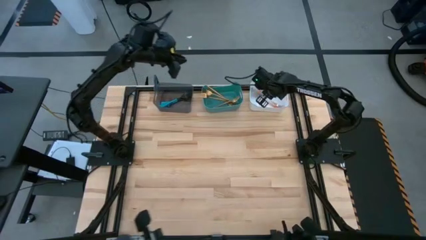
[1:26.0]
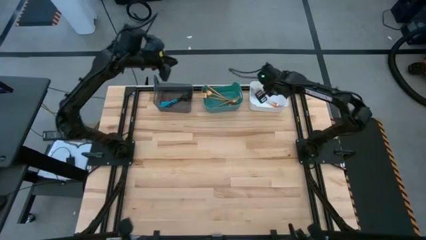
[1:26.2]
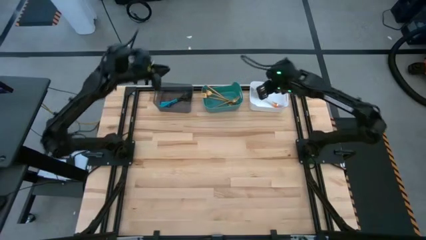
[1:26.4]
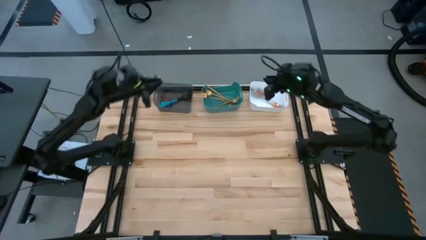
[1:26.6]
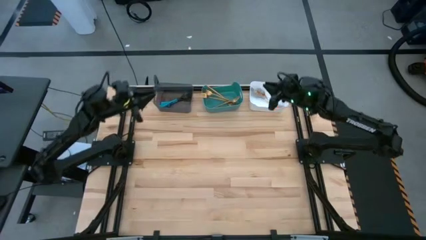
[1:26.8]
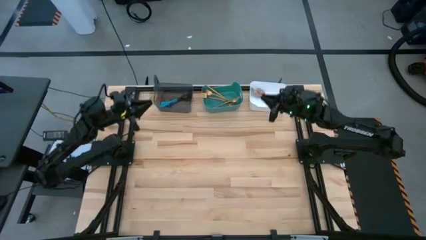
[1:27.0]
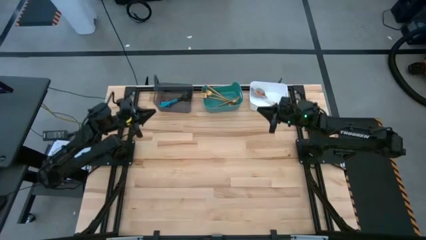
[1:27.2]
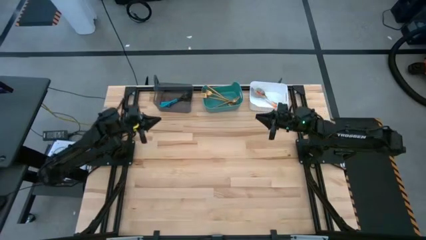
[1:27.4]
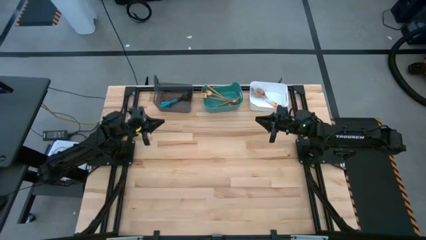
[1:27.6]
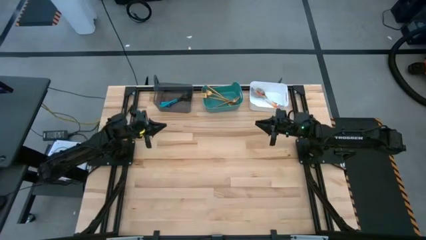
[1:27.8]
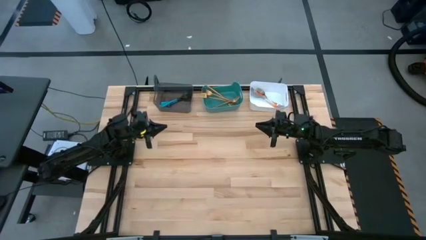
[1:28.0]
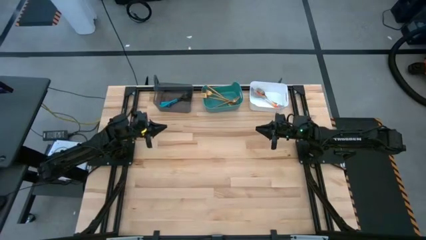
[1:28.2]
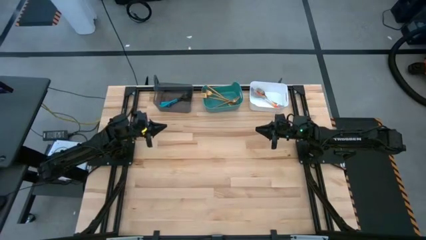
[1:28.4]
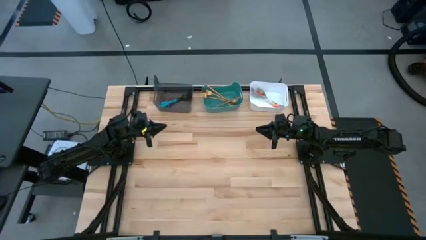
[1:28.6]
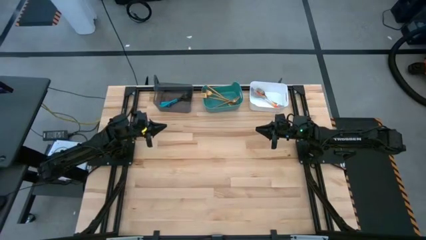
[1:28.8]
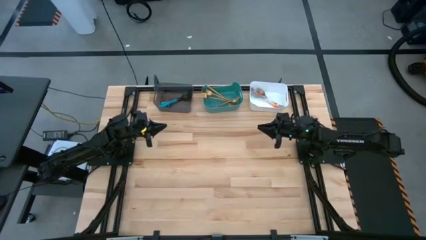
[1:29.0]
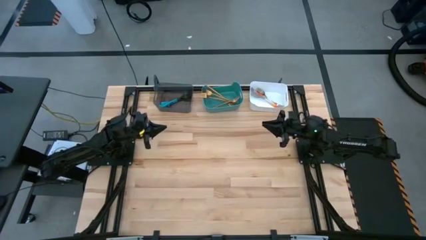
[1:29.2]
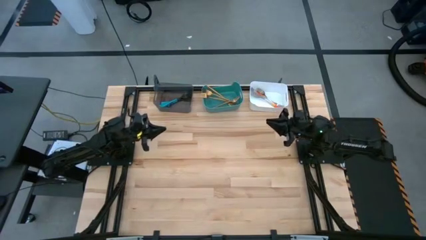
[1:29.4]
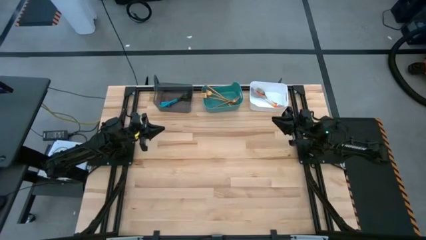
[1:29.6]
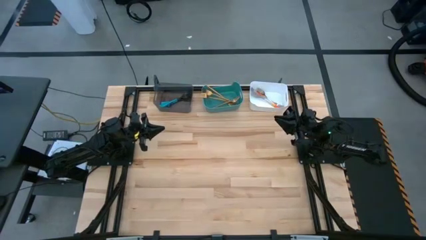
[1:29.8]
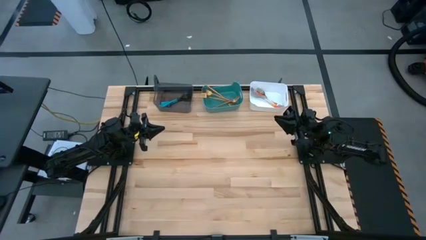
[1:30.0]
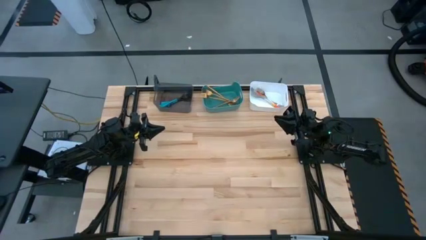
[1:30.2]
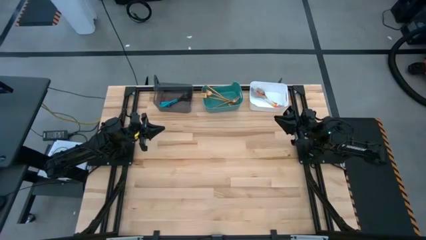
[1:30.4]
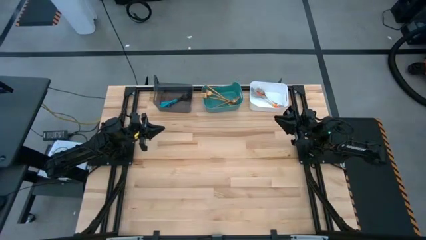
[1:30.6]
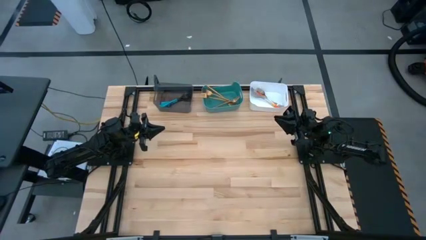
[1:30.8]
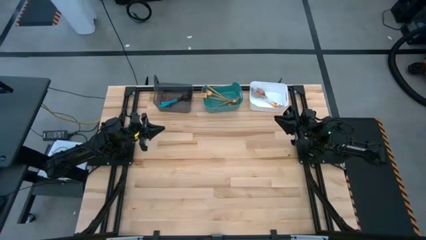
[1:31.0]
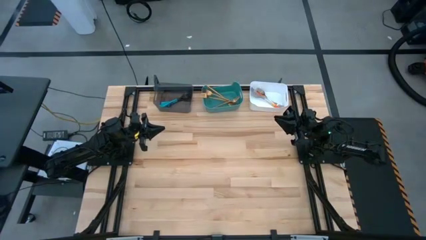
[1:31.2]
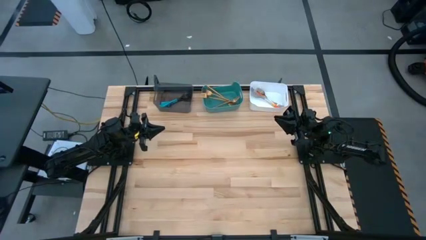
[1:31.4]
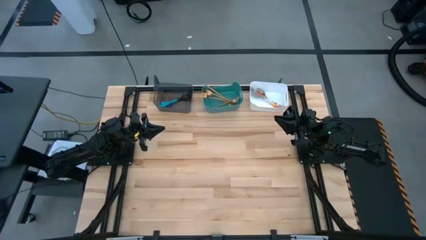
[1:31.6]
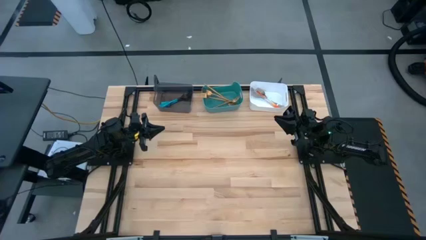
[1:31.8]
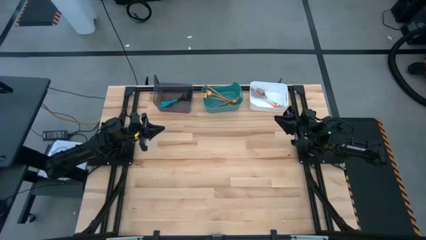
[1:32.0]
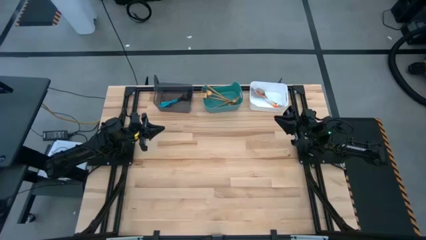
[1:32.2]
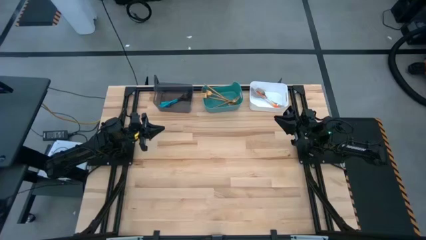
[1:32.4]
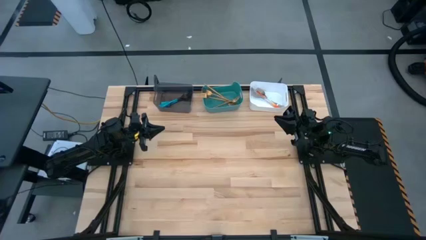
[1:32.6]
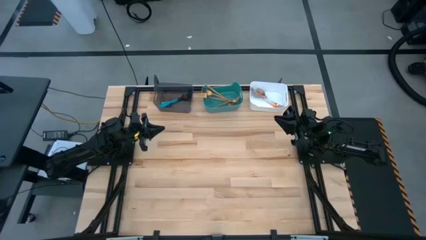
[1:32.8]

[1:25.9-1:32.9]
Task: Sort silverware by color (type)
Return to Home Position

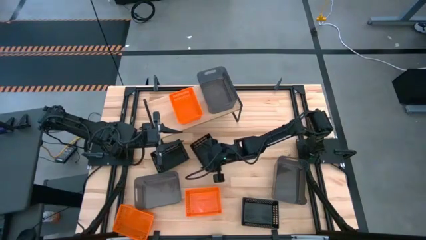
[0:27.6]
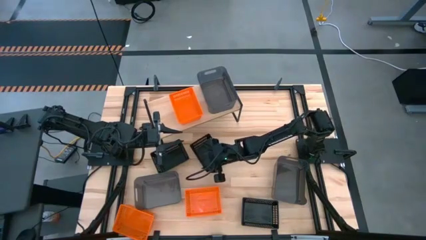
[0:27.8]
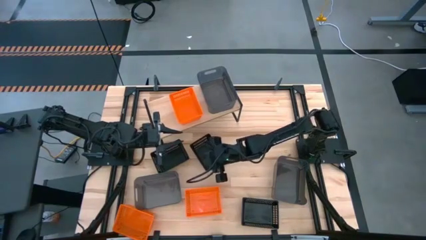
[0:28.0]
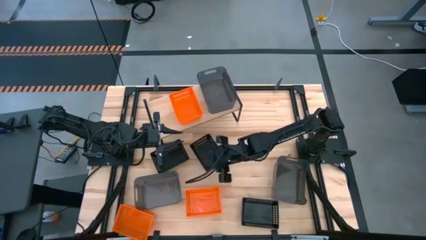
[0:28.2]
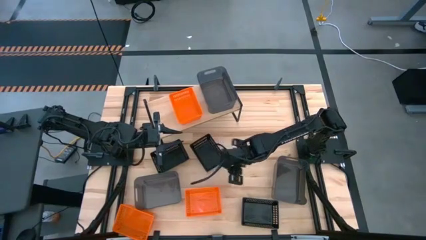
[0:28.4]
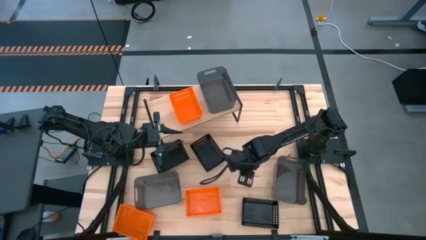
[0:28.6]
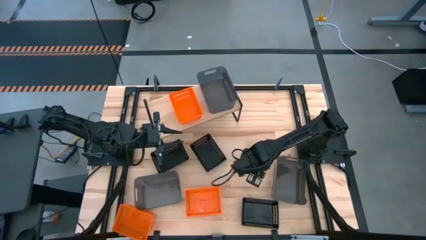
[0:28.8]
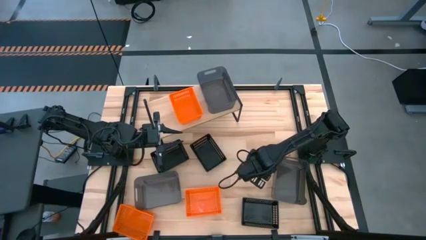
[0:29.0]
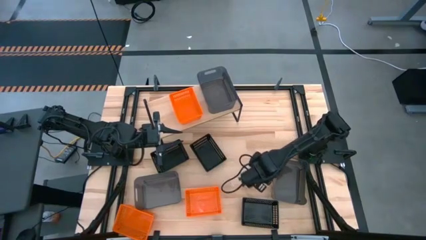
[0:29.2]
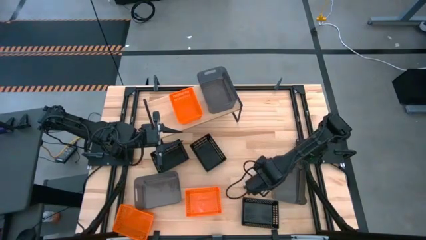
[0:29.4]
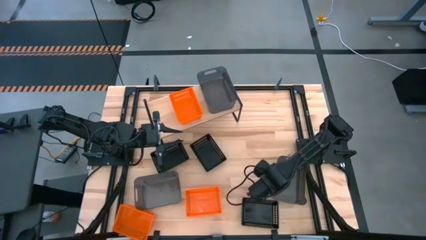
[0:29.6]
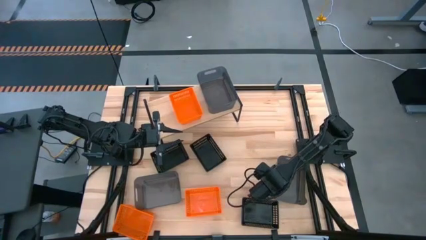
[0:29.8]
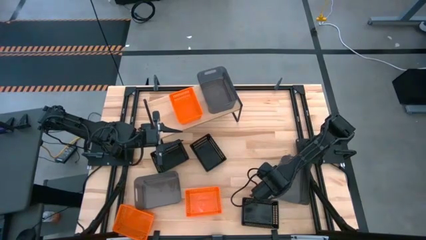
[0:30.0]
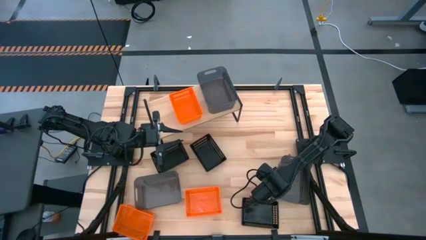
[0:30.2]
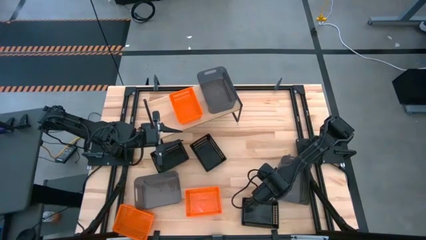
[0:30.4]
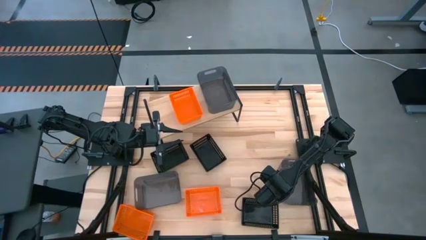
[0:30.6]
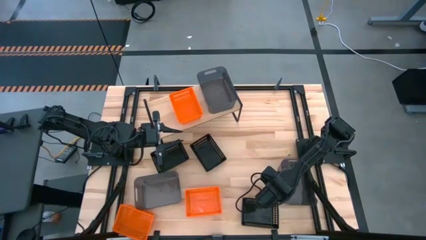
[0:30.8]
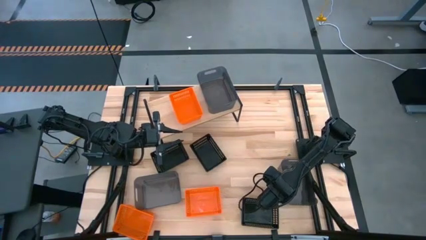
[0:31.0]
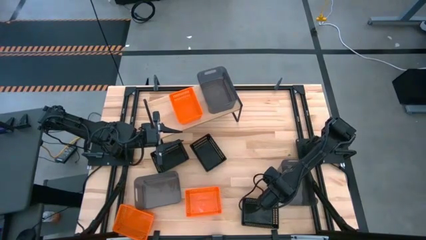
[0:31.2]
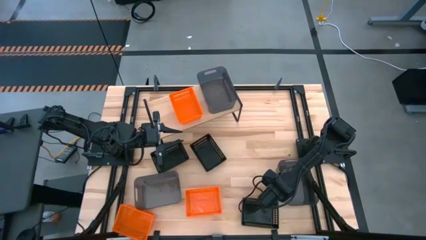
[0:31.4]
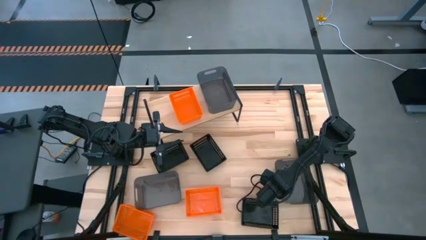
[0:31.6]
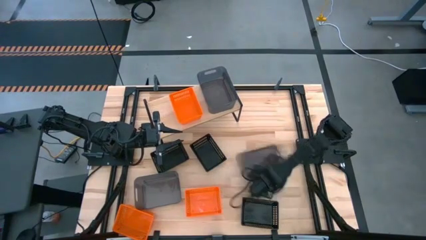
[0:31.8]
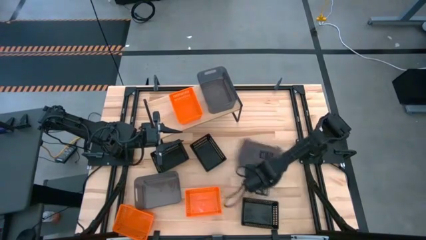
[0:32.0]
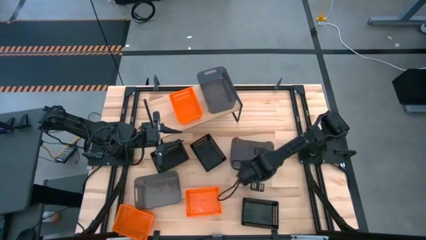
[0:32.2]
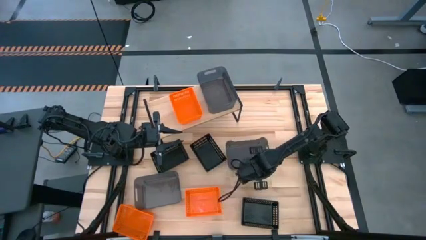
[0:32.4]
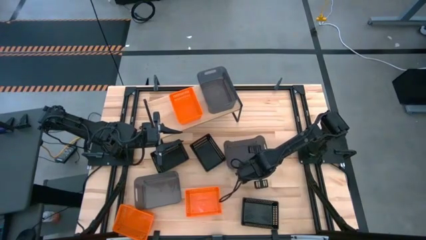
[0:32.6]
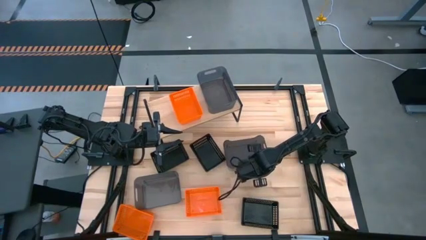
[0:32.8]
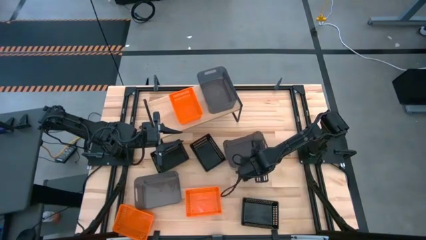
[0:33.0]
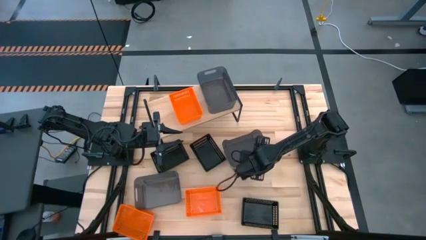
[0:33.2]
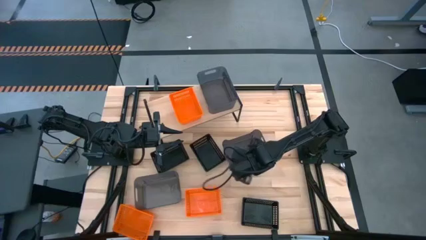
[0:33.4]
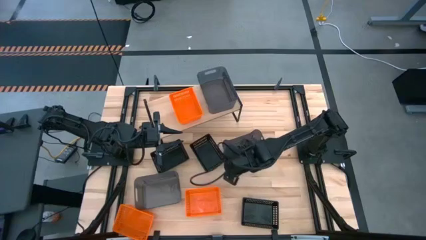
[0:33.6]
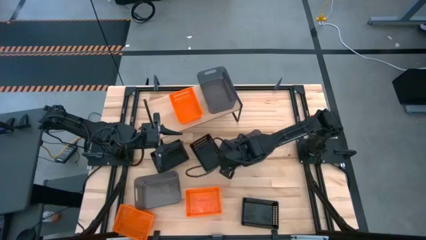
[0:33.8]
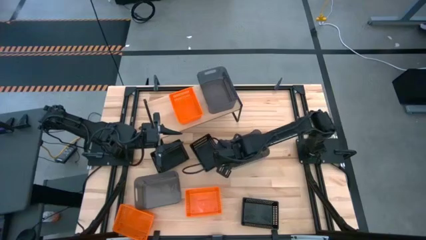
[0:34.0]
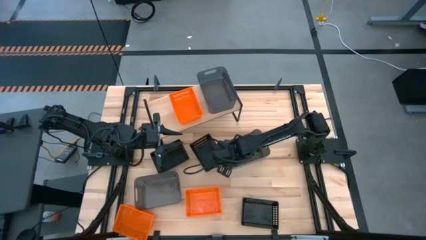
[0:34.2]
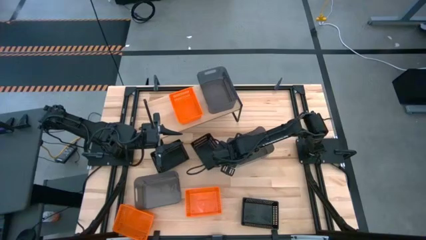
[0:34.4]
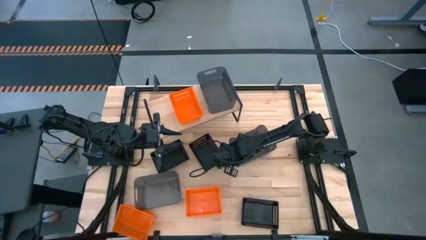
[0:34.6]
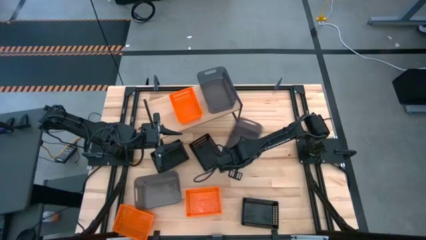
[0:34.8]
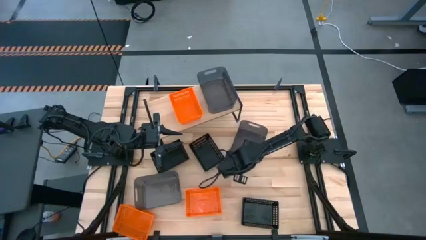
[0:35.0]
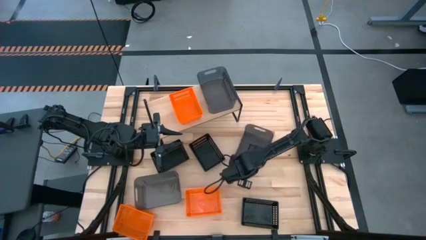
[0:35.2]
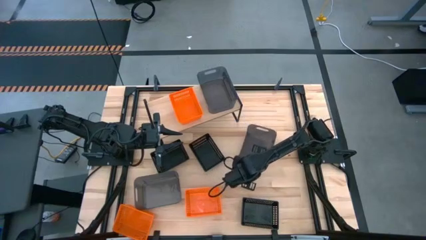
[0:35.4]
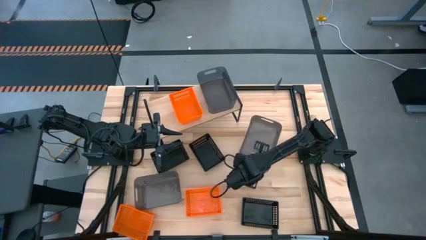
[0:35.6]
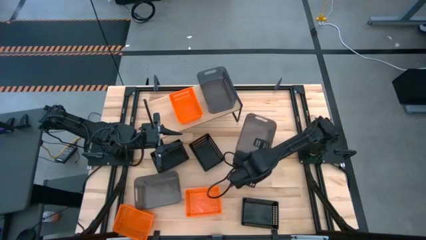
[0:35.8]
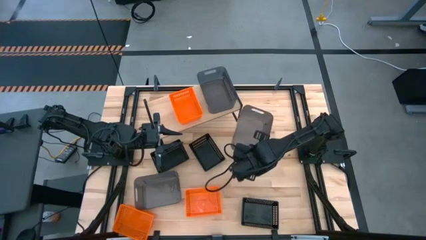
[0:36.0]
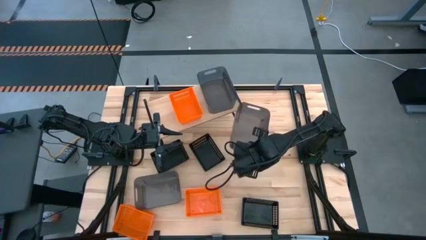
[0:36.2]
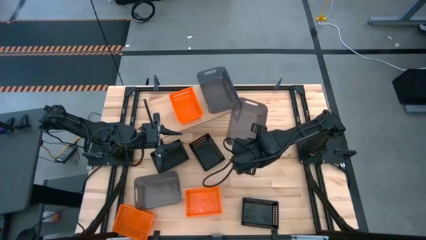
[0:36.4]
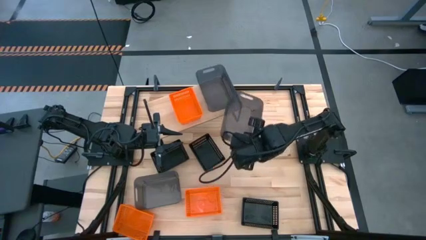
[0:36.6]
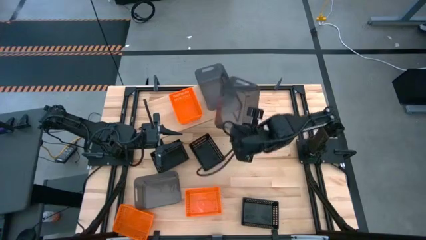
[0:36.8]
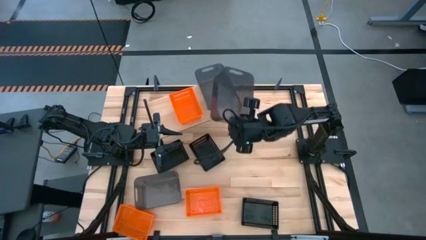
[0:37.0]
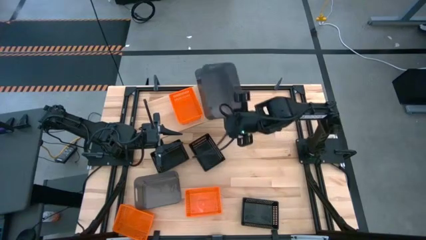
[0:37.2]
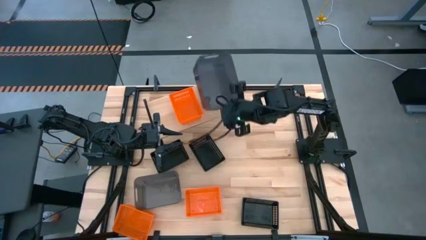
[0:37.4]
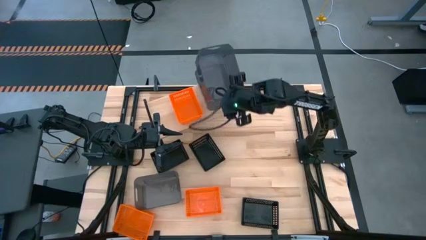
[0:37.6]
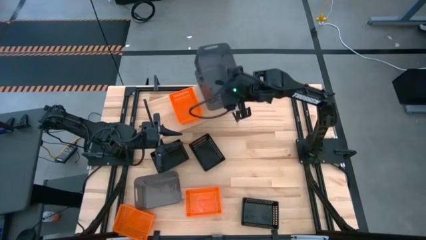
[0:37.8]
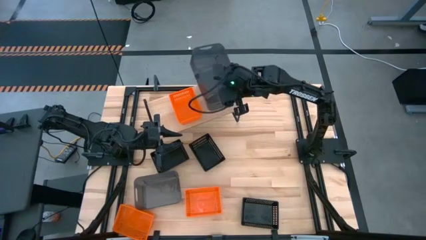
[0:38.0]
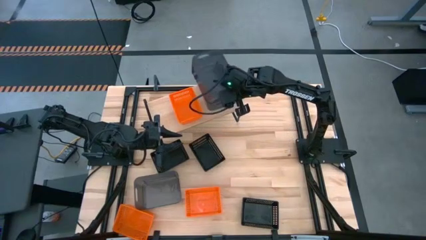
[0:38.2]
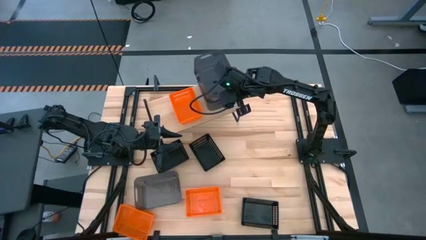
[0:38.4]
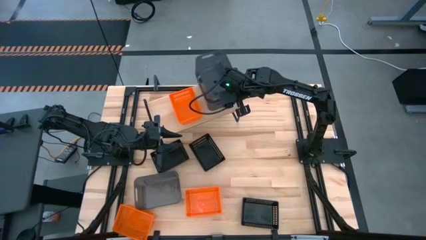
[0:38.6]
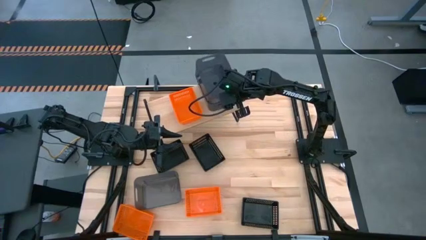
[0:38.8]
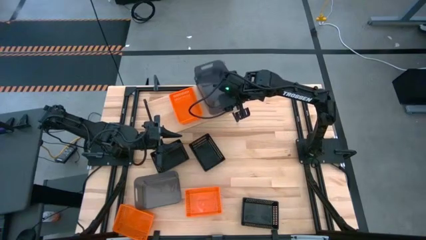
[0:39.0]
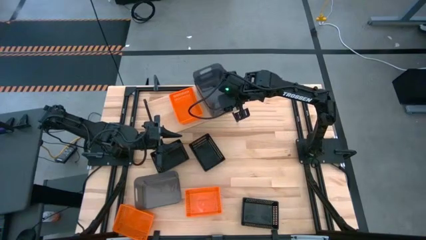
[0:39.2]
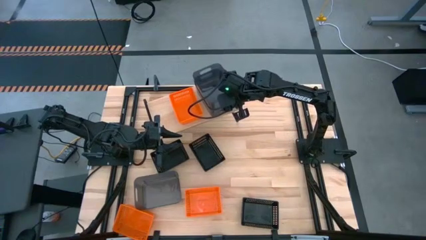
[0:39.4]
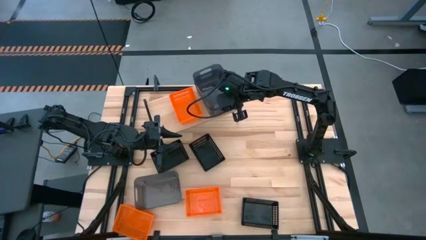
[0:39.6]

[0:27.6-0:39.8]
Task: Stack baskets on shelf by color
Stack the right black bin on top of the other black bin on the shelf
